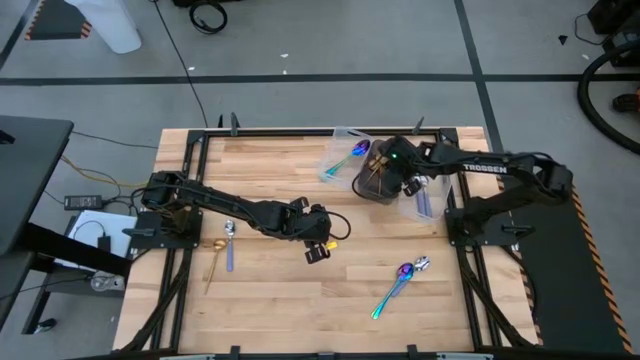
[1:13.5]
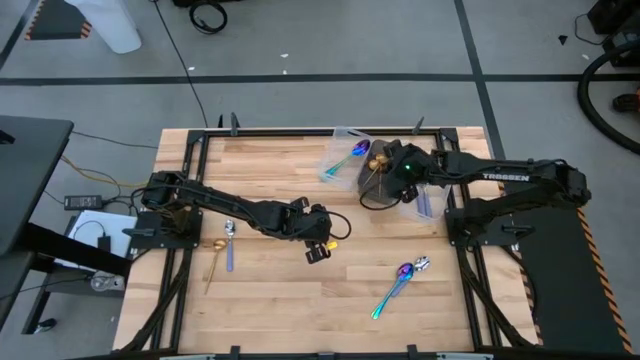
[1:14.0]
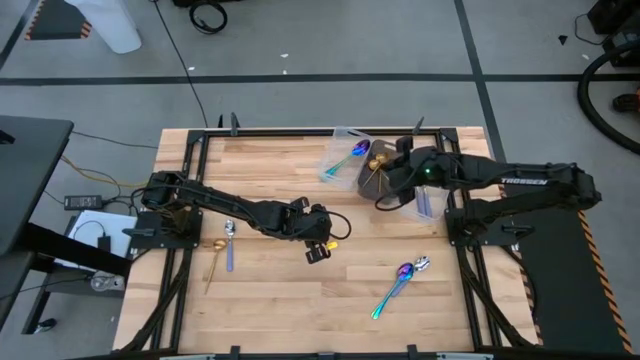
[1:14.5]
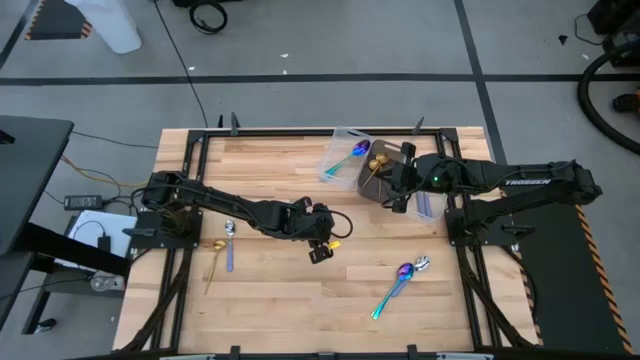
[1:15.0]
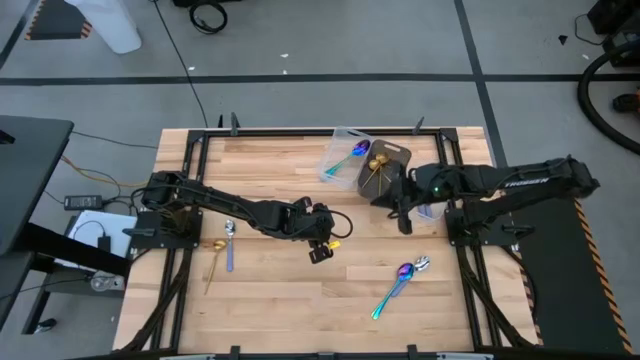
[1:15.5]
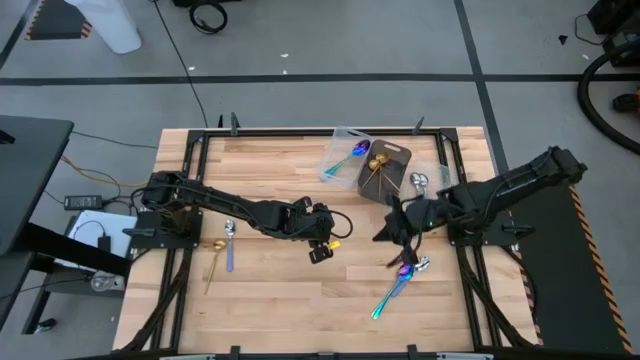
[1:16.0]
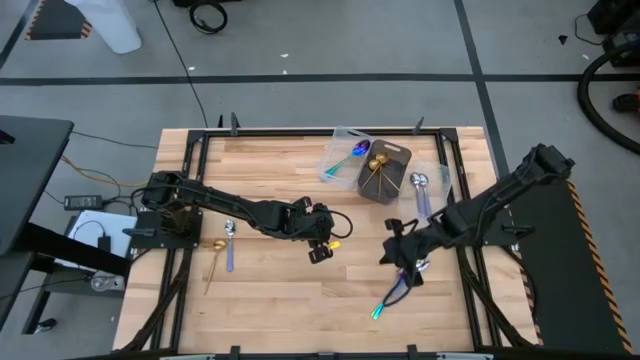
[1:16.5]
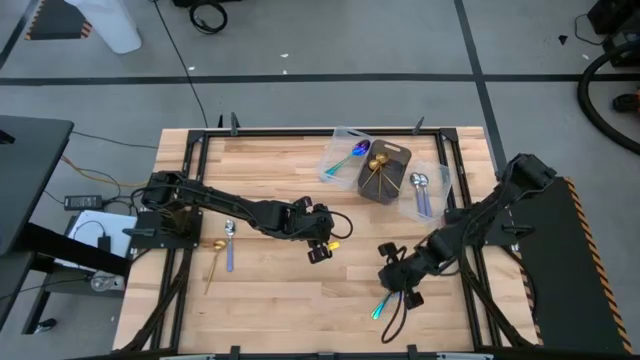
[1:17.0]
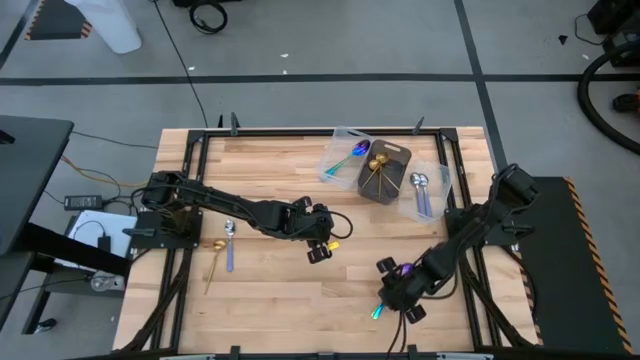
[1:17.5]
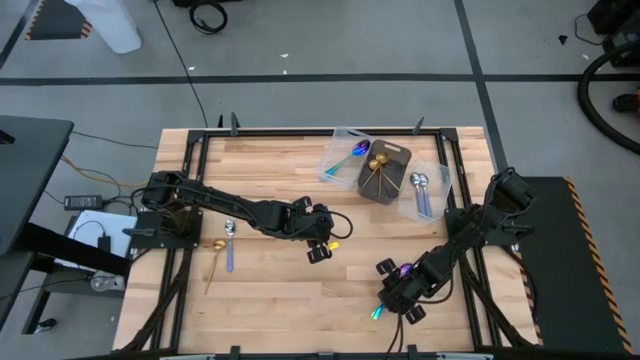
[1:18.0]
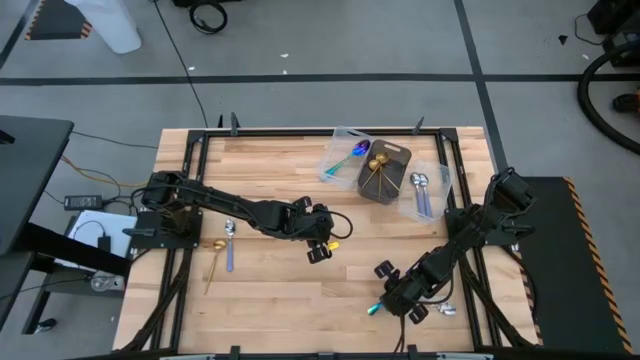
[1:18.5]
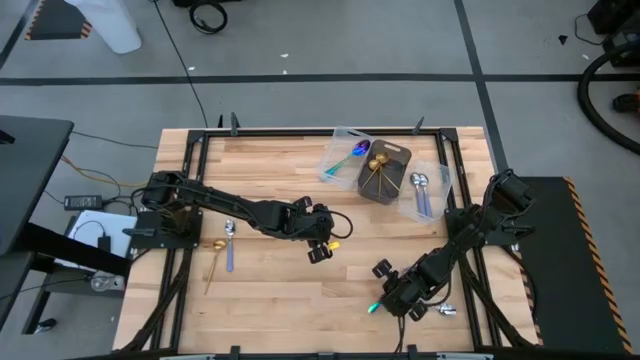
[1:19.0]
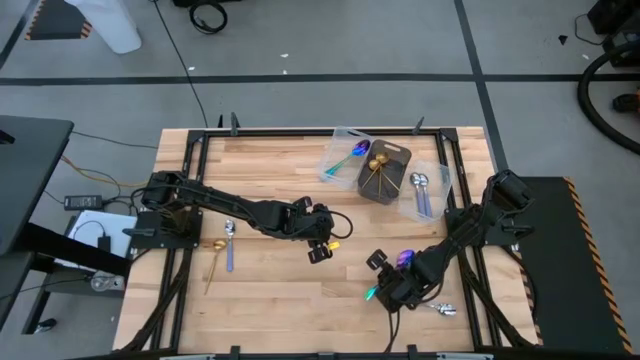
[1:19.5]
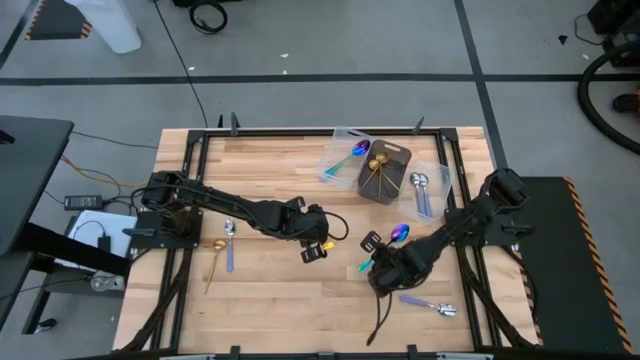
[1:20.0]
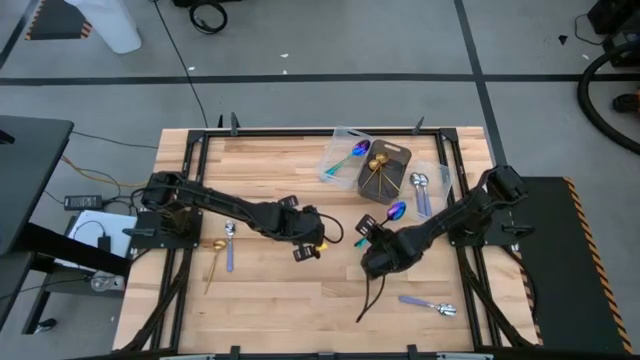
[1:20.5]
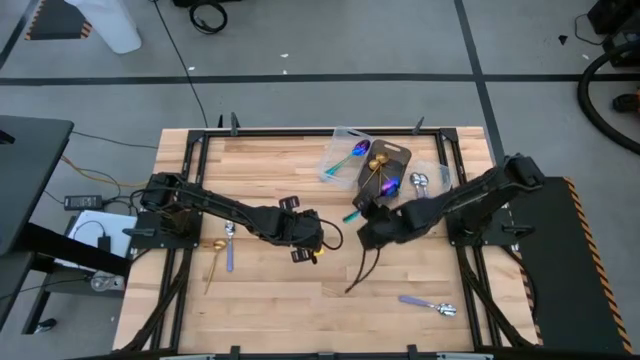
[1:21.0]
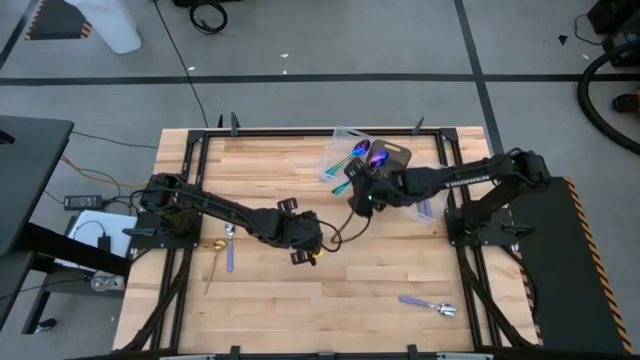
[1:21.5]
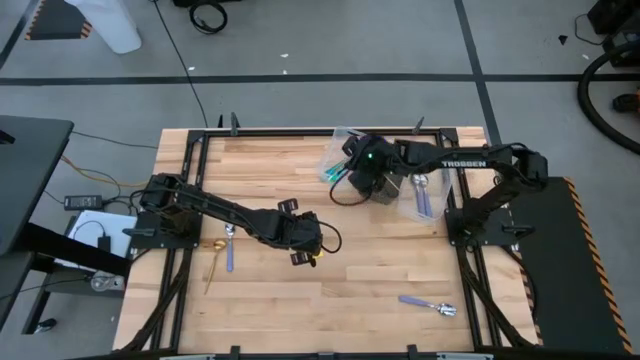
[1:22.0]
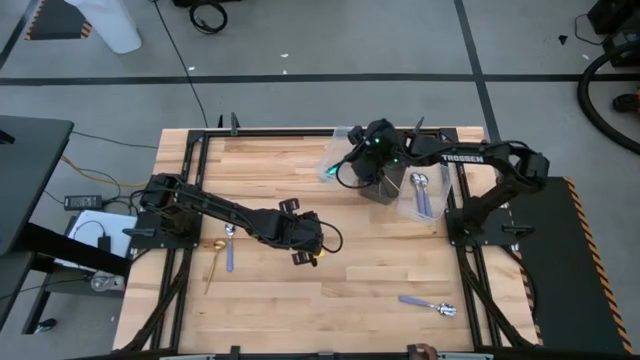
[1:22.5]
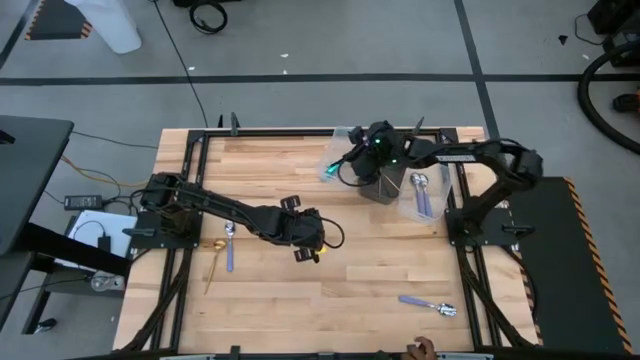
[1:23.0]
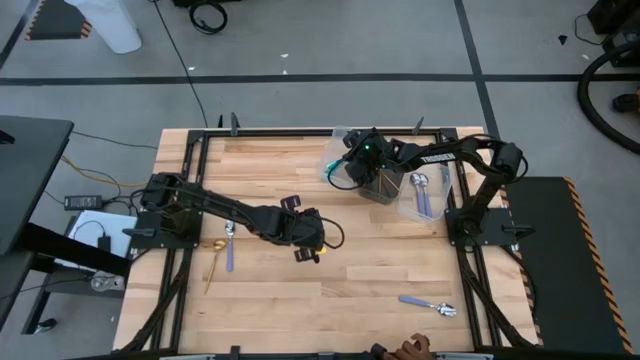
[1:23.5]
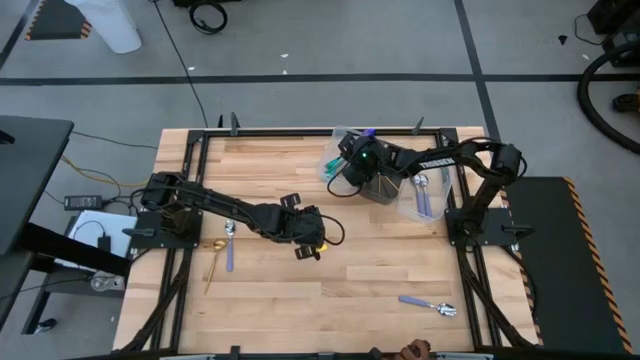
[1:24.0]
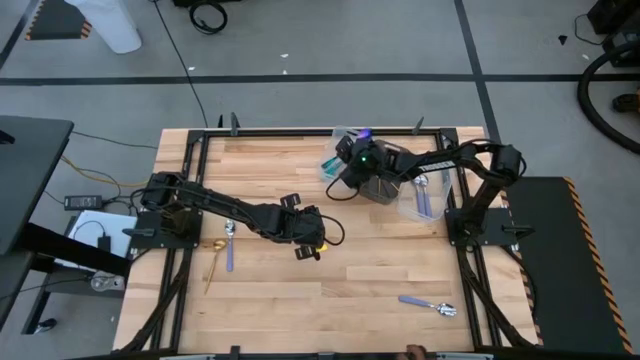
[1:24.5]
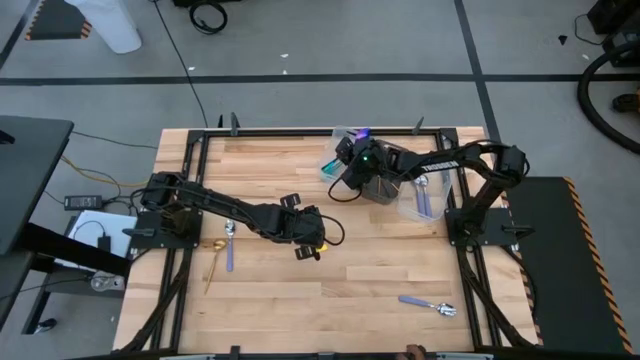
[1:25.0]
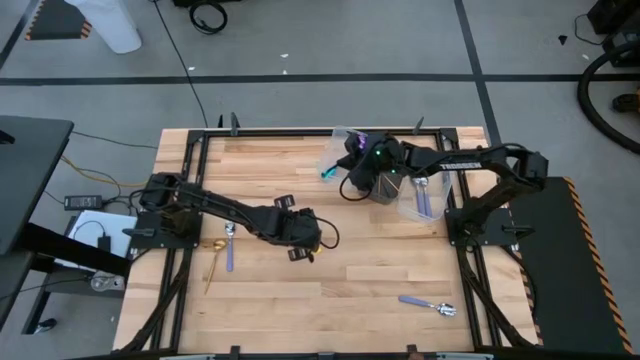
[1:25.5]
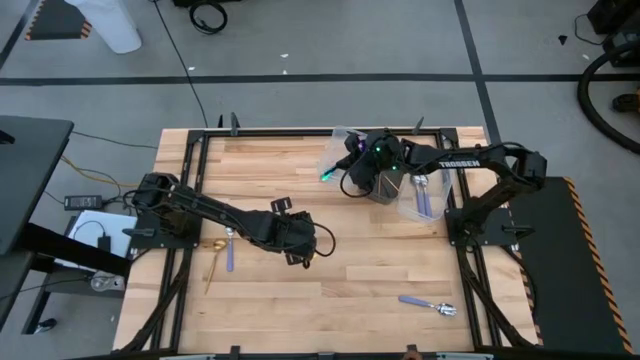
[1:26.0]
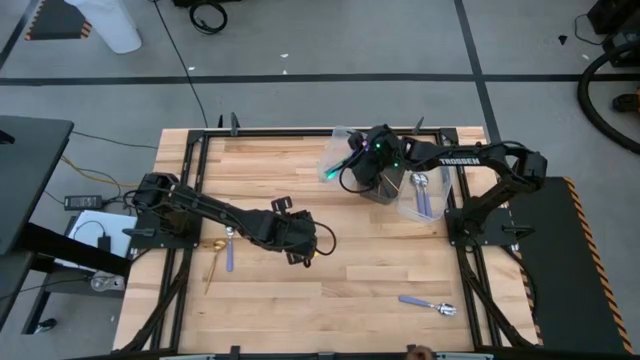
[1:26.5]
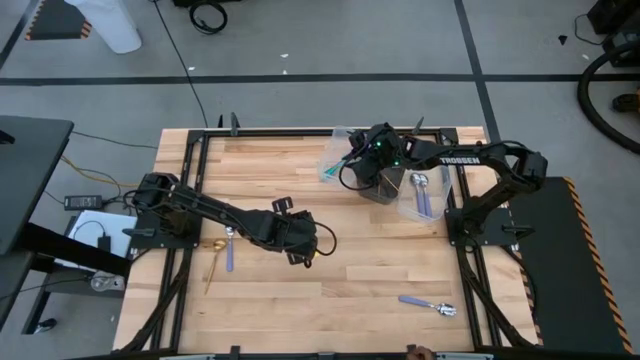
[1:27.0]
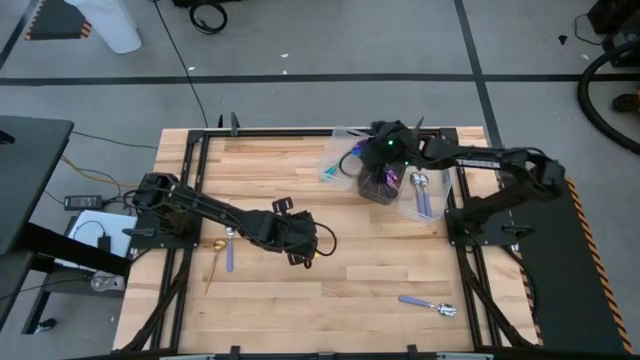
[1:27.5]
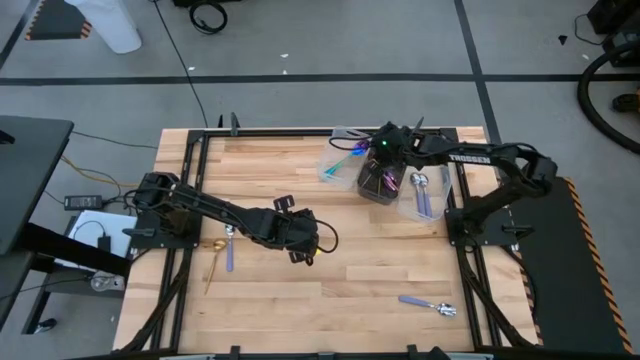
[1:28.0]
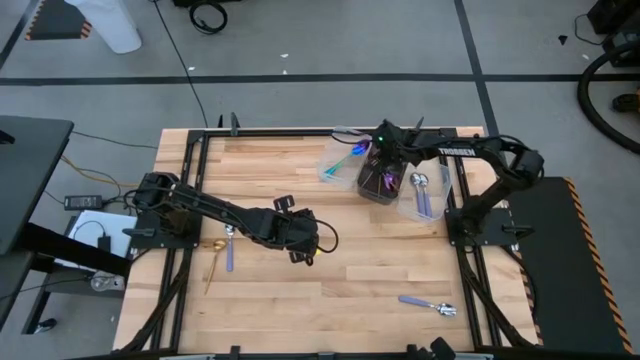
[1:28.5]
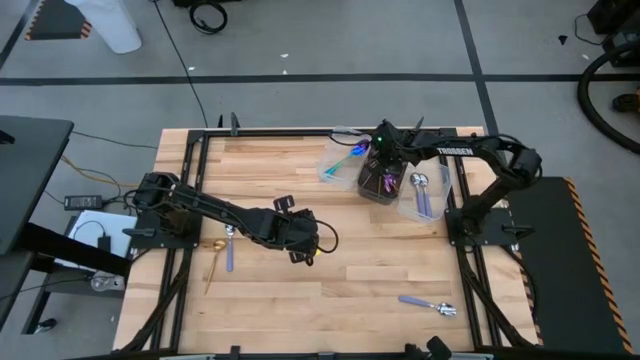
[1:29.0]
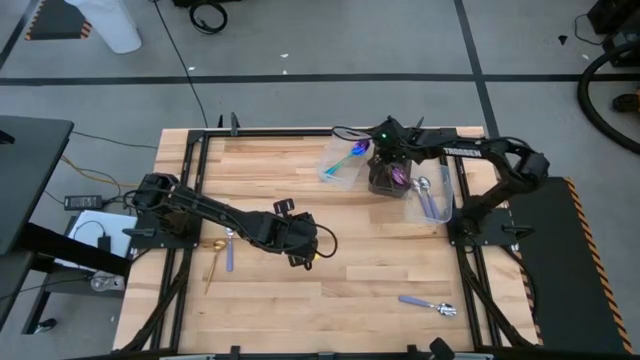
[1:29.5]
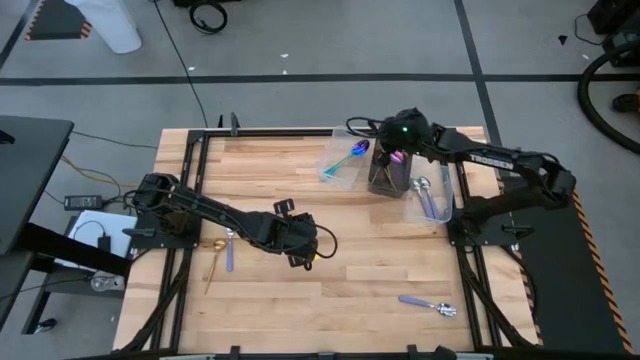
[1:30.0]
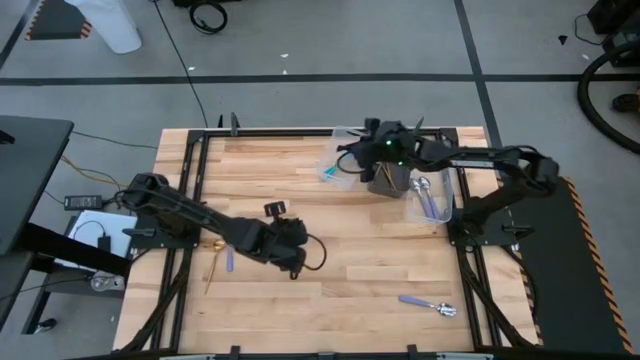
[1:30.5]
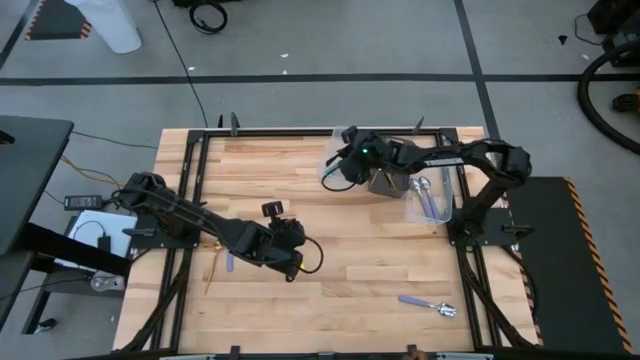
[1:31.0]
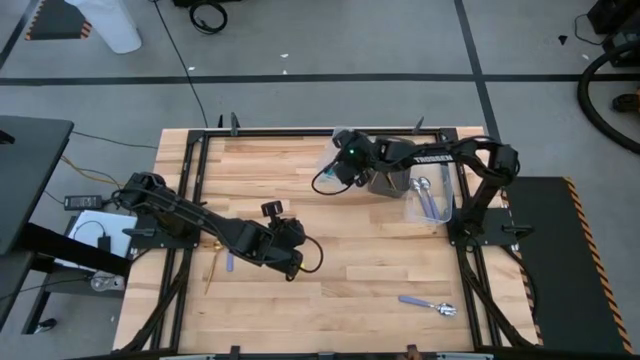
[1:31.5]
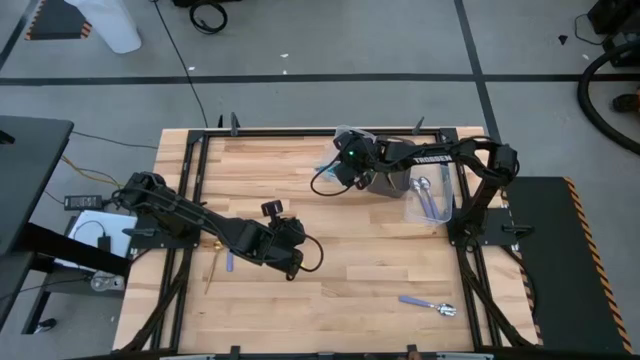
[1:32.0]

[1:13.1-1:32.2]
Task: Sort silverware by color (type)
Put the blue spoon into the left transparent bin

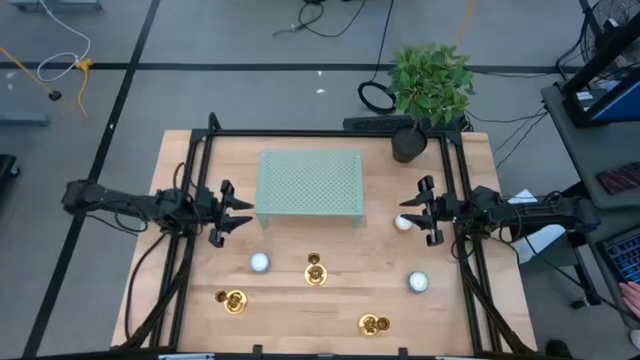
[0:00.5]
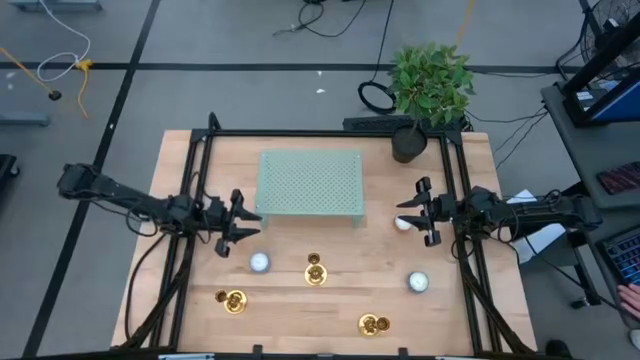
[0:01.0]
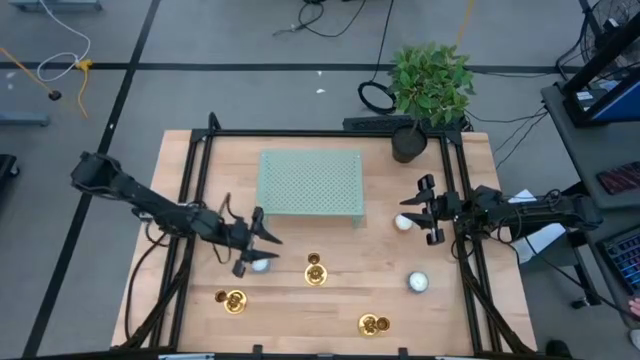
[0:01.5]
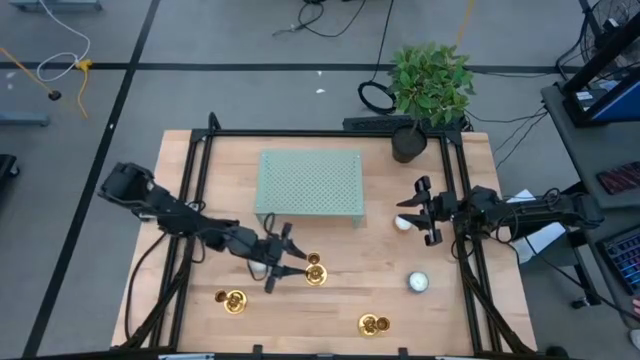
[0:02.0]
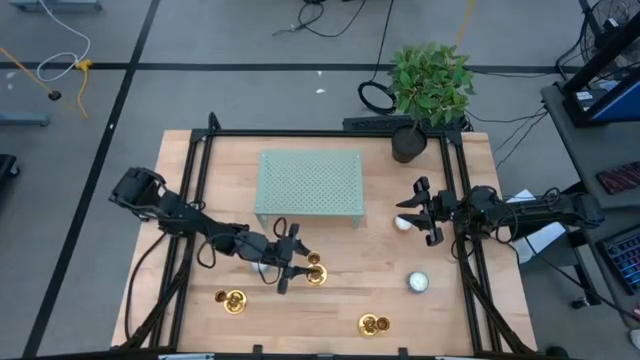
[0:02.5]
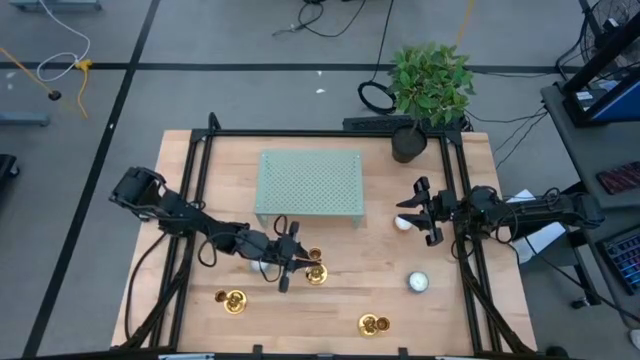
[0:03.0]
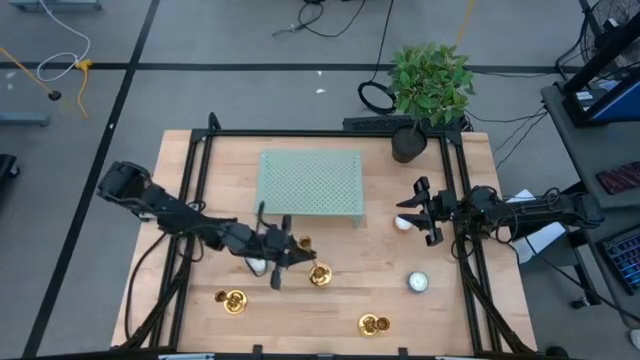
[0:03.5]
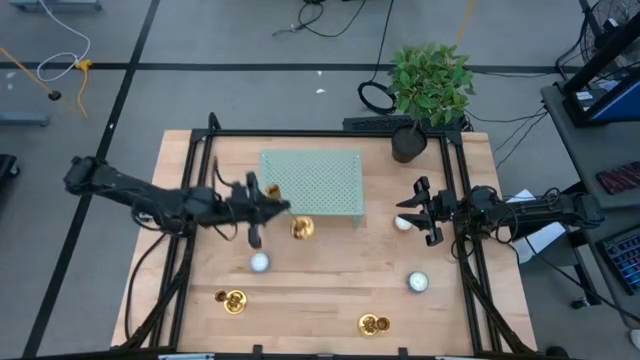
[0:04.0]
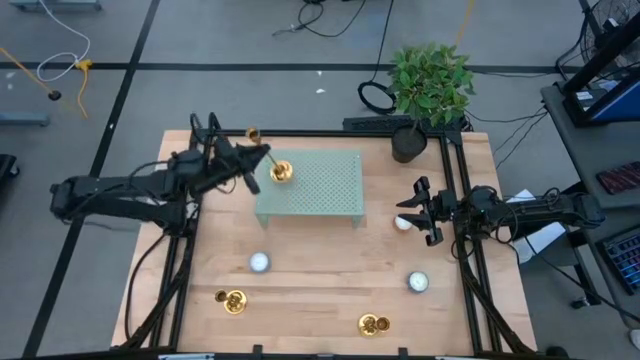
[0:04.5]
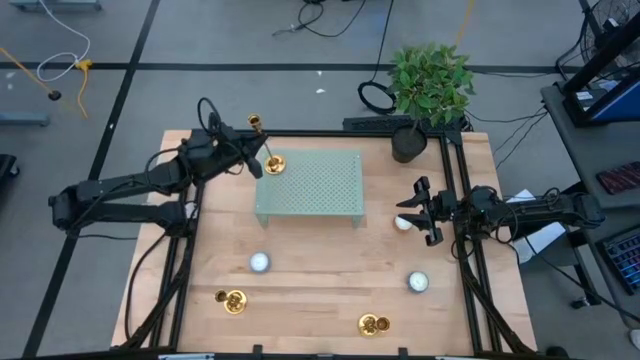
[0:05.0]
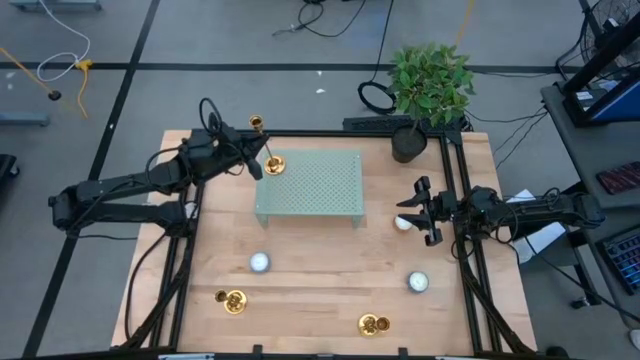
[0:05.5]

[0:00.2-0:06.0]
Task: Pick & Place candle stick holders
Put the top gold candle holder on top of the shelf
